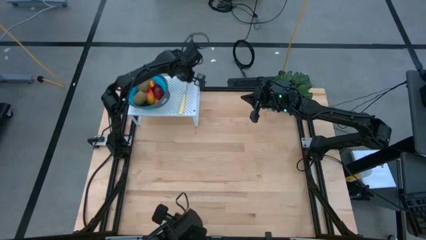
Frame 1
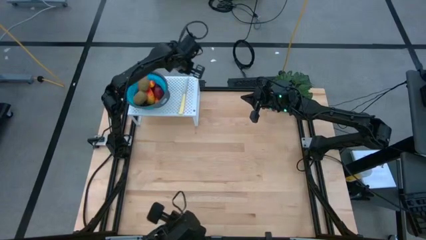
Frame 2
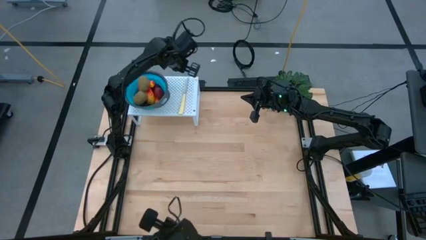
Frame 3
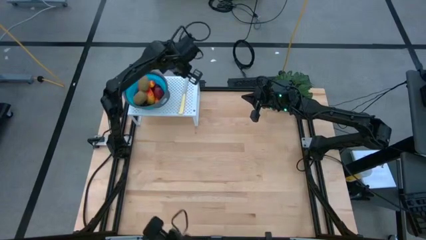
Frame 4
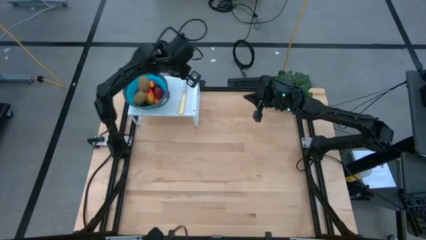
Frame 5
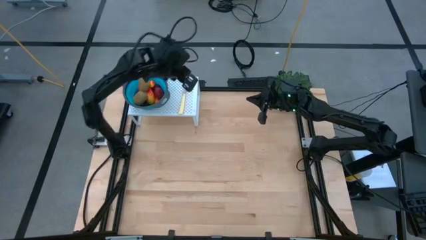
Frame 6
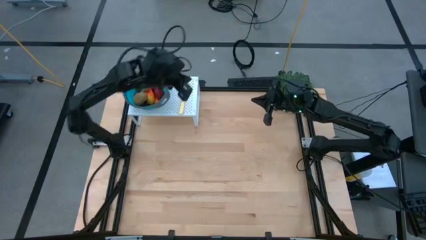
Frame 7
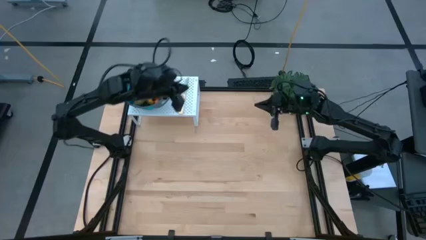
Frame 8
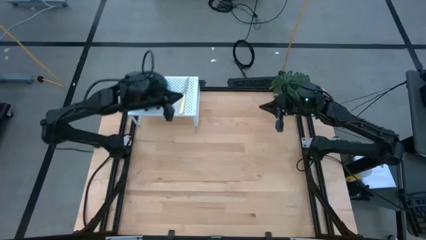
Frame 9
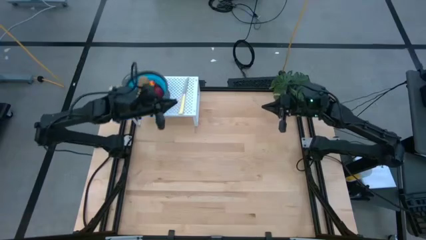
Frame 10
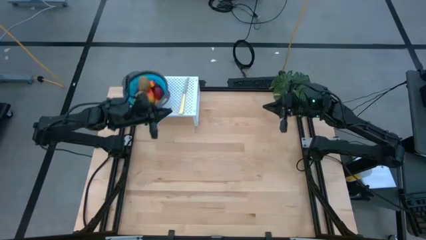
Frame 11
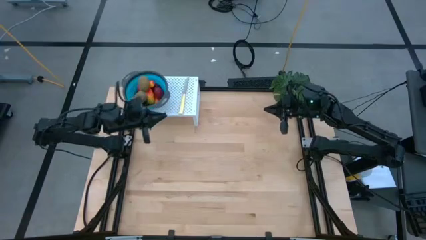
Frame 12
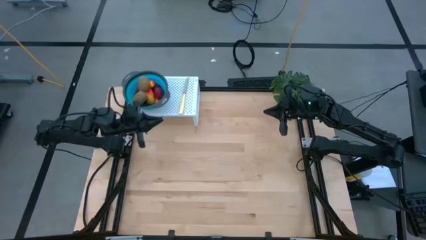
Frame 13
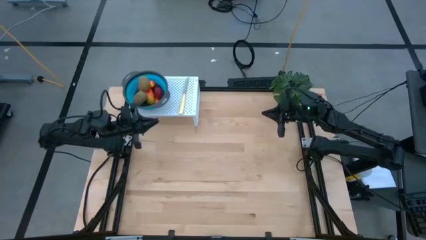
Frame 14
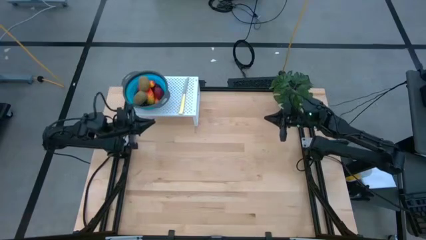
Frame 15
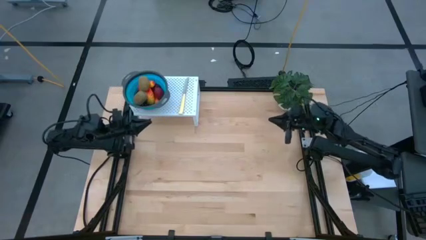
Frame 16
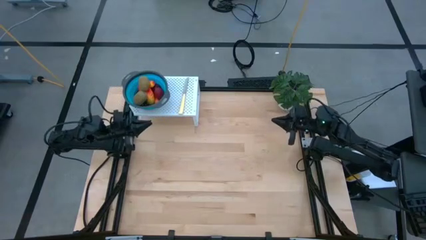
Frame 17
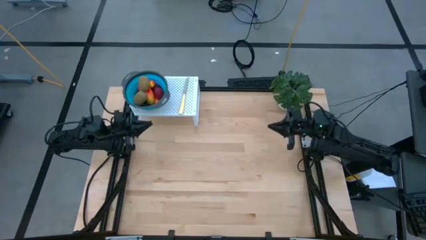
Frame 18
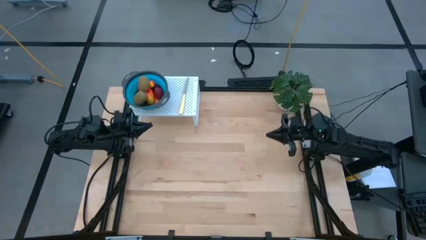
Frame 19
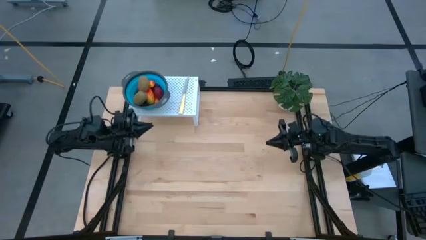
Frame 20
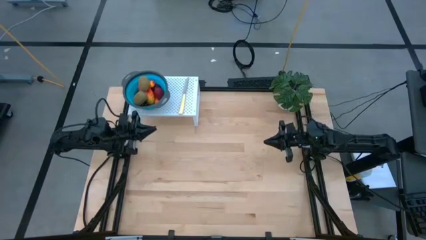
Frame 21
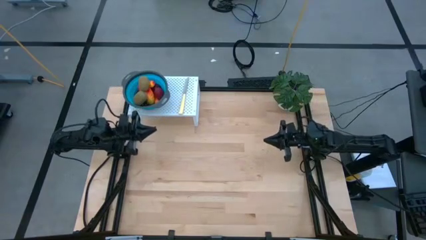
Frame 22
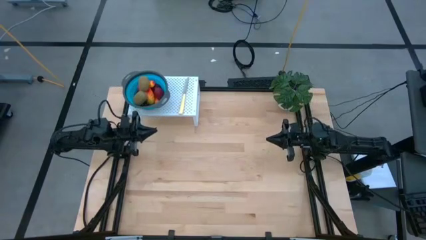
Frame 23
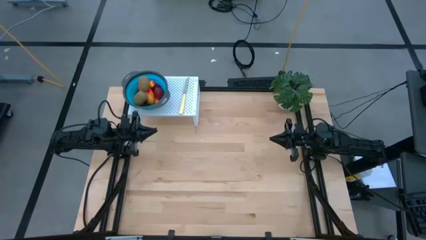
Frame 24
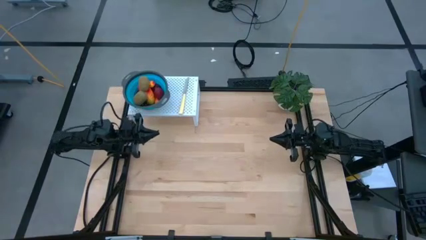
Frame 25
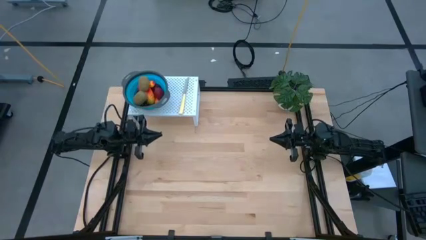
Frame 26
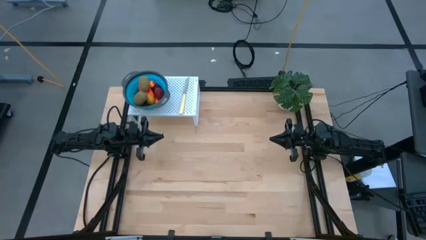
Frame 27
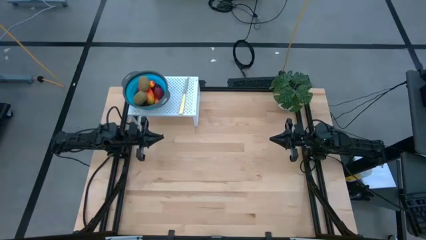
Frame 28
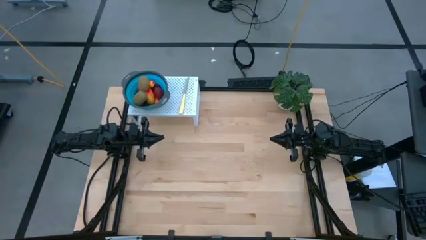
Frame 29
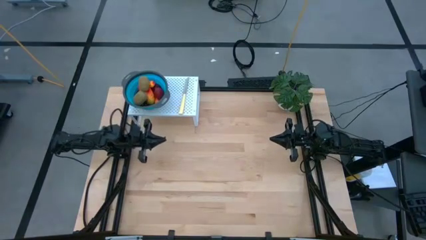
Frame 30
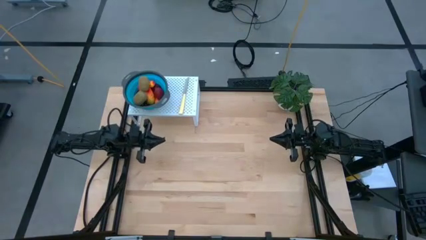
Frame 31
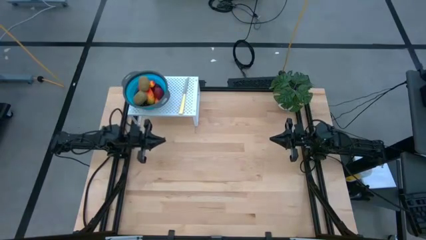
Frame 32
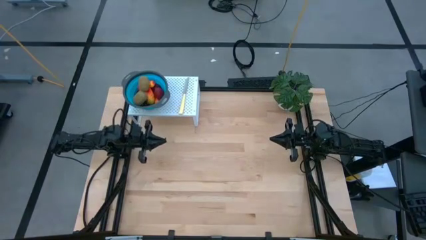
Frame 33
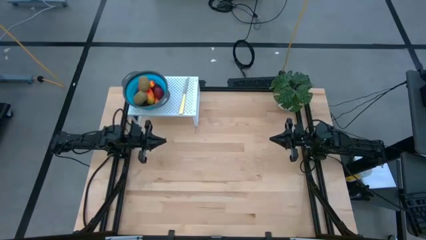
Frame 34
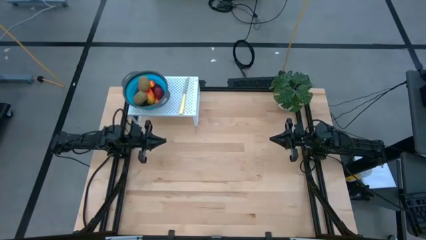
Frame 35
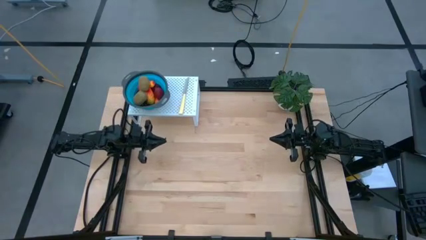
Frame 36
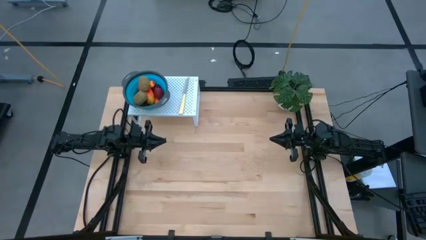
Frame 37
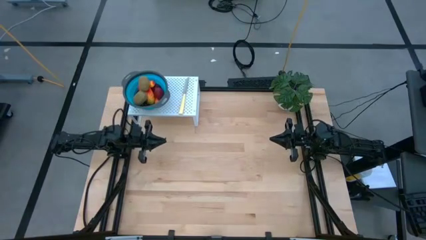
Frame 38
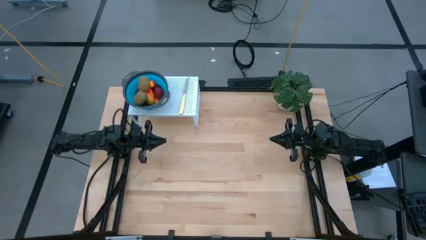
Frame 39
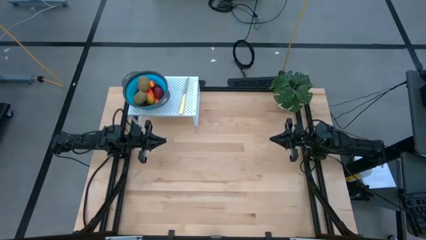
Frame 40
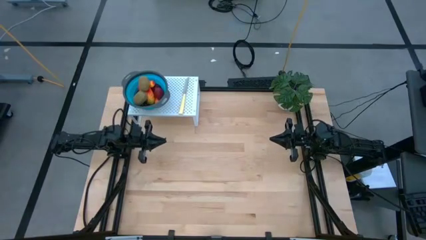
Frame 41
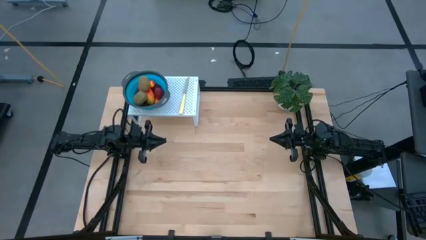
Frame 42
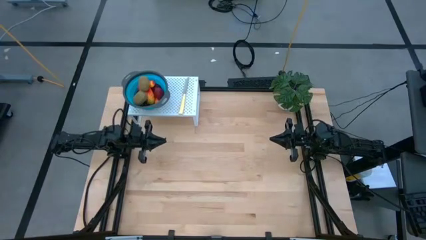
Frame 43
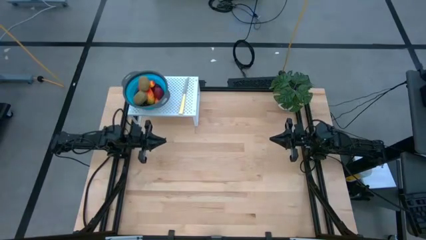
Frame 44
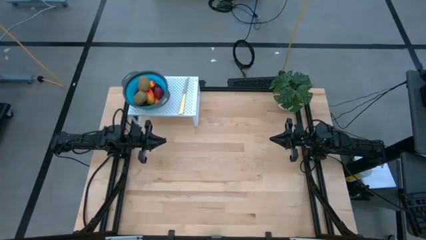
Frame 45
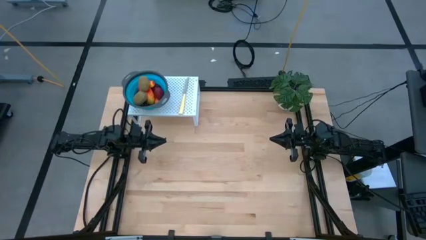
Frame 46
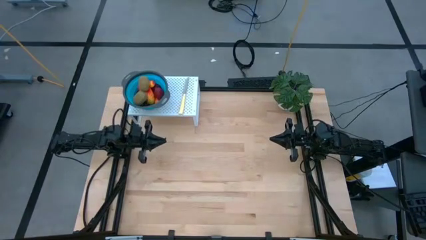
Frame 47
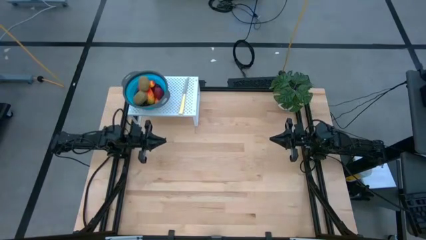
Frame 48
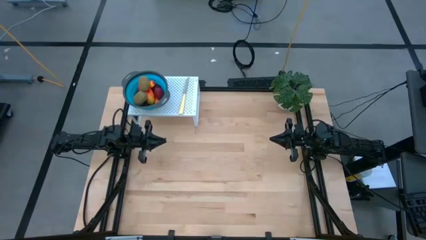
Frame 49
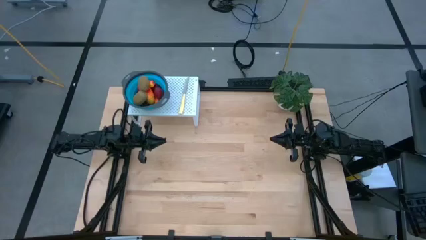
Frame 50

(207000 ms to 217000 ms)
Task: Pick & Place Fruit
Return to Home Position

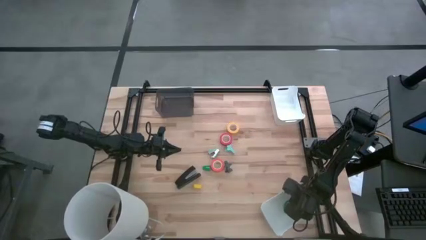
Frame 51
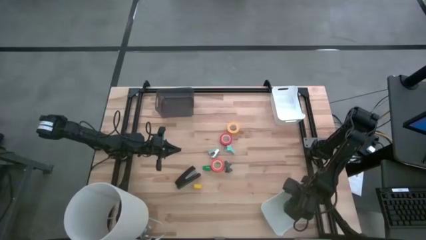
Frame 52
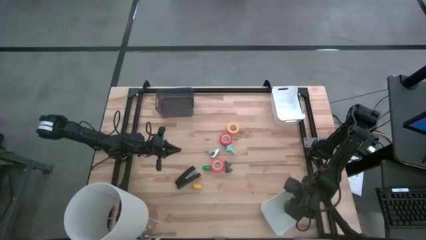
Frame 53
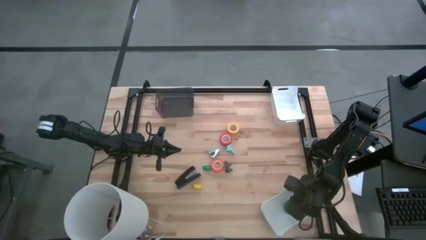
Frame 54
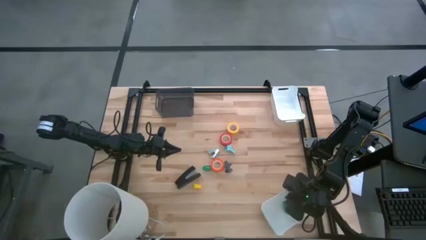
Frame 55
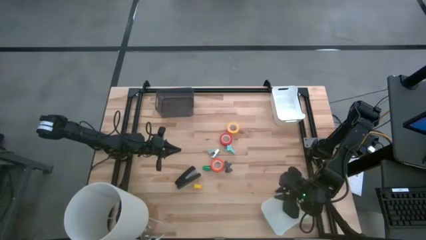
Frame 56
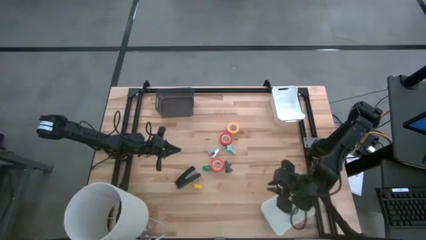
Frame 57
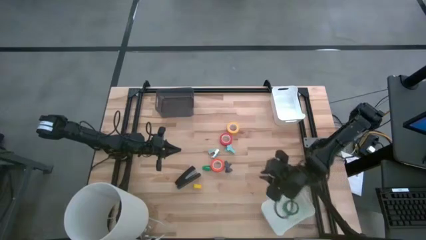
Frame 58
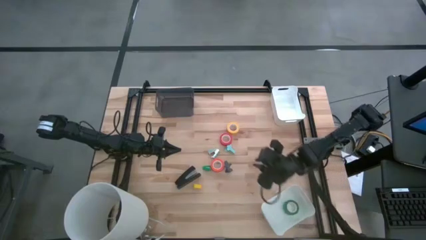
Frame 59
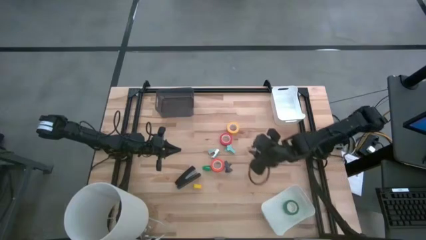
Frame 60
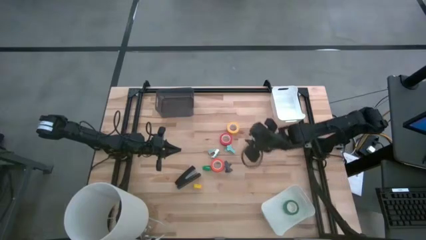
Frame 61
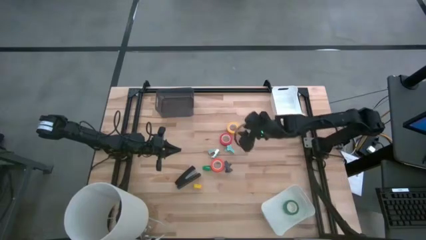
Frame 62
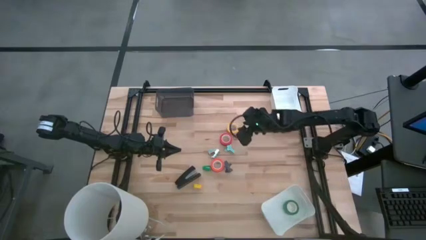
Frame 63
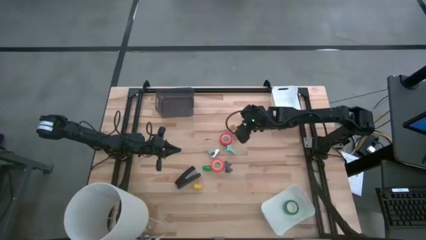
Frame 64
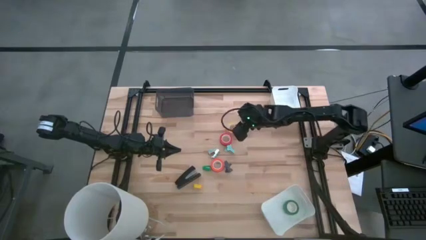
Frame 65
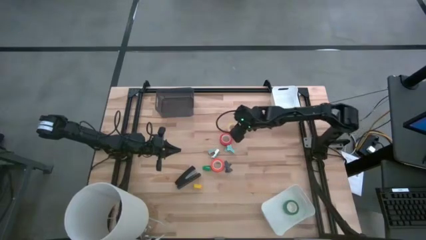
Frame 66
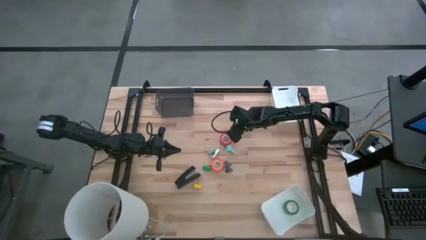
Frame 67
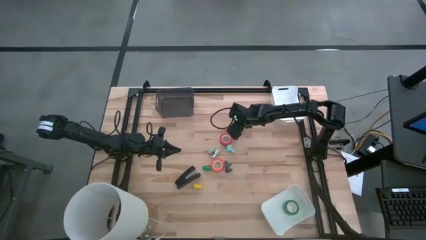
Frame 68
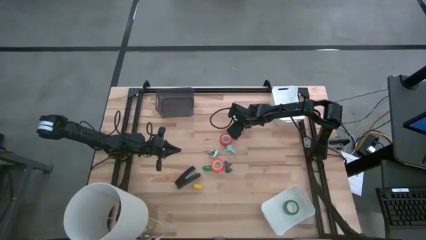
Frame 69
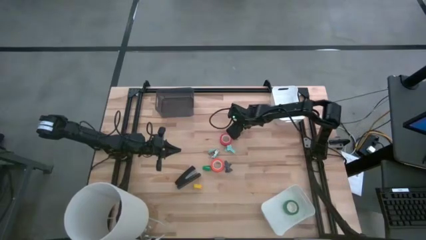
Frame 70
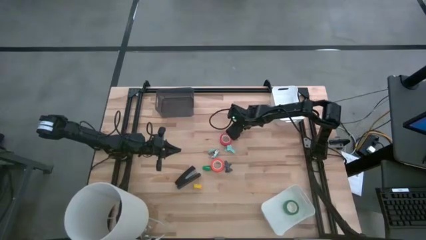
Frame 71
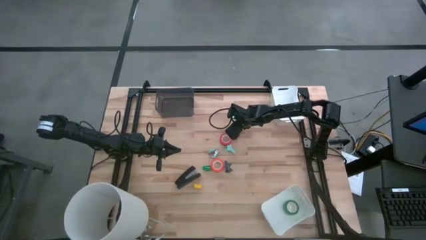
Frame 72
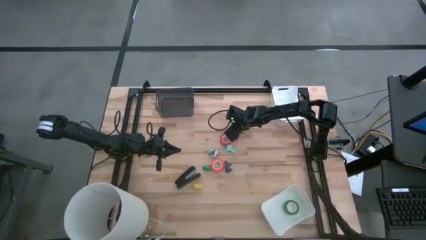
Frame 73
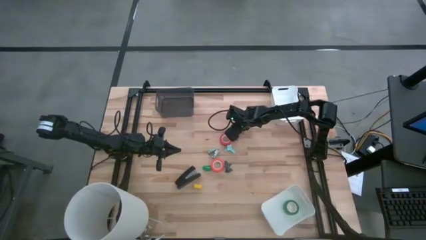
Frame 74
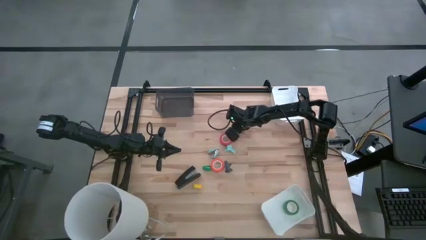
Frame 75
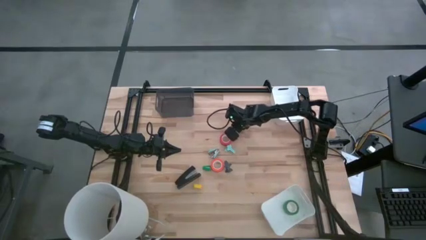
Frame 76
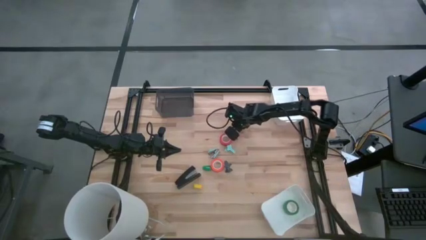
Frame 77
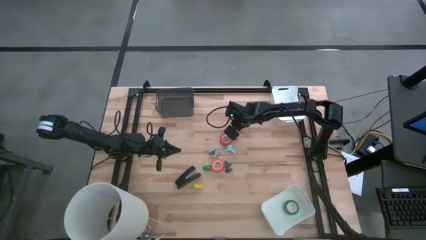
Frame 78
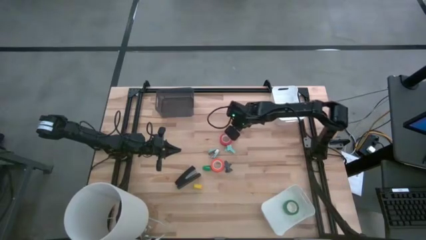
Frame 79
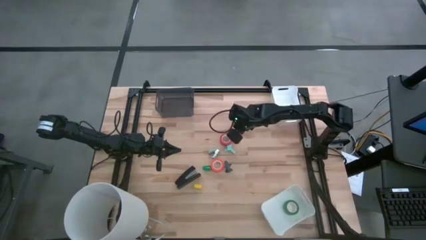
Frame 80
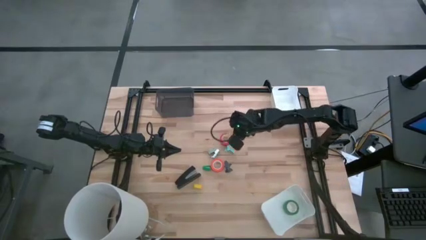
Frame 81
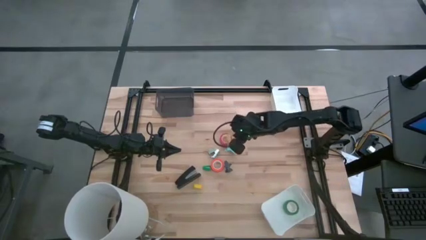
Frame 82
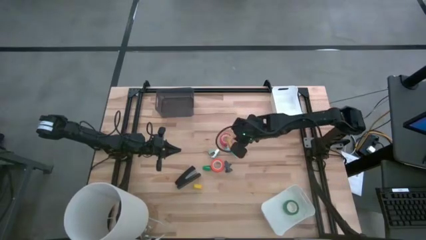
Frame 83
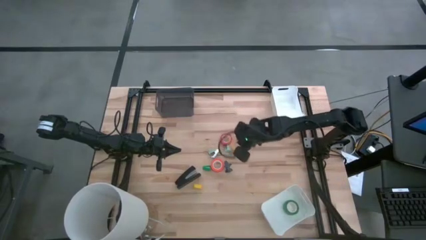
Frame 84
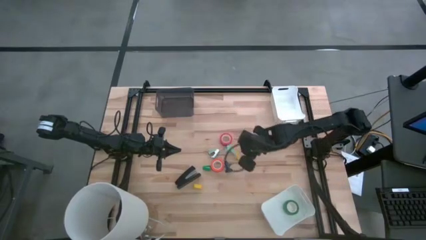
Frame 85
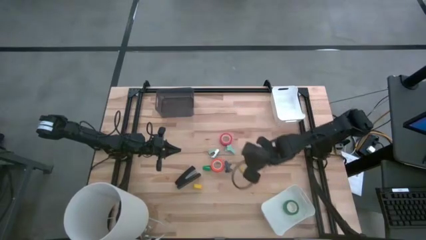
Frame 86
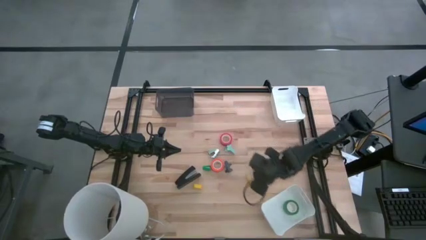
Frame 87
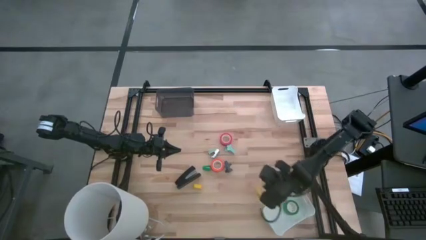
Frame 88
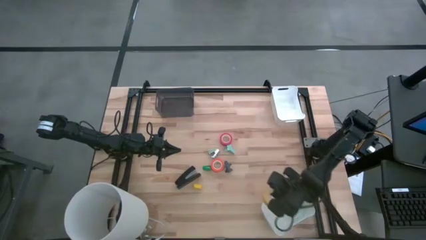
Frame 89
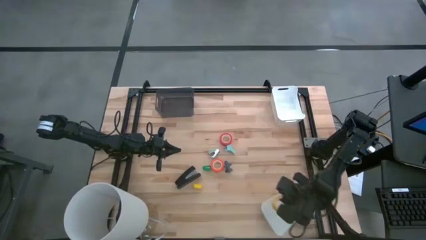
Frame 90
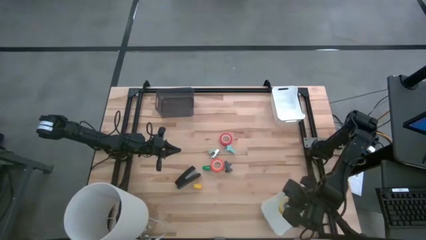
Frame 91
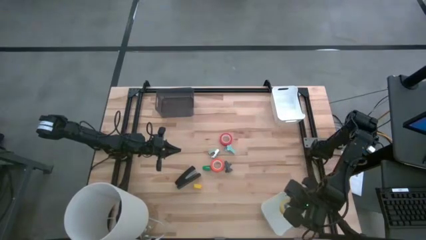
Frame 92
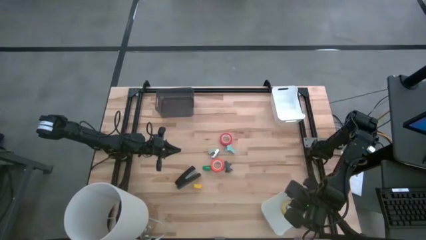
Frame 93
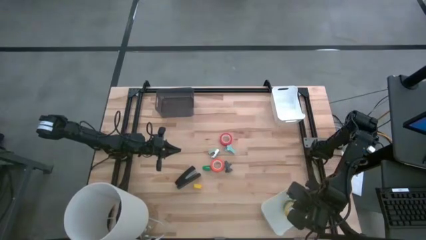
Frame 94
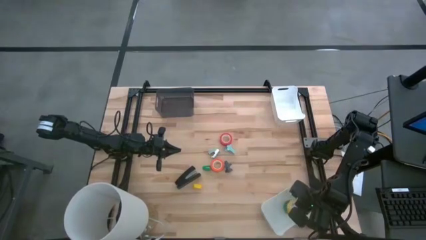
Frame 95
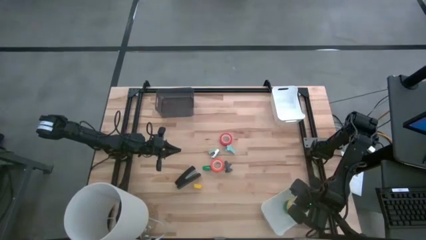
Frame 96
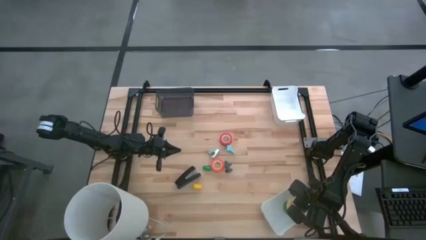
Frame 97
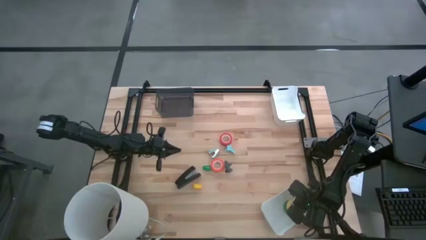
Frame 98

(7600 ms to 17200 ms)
Task: Pick and place Stapler, Stapler remover, tape
Put the yellow tape into the bottom white bin
